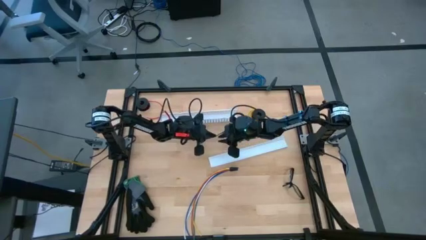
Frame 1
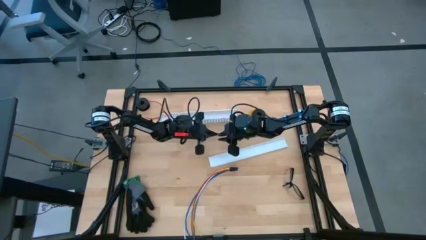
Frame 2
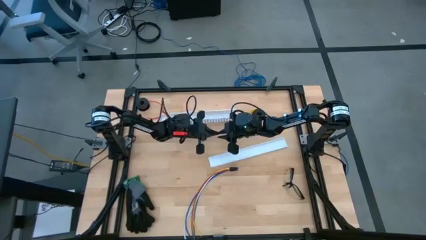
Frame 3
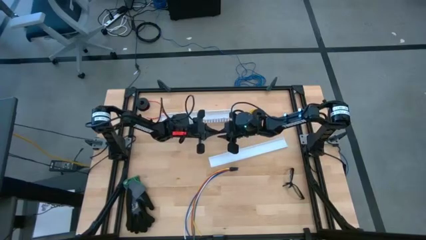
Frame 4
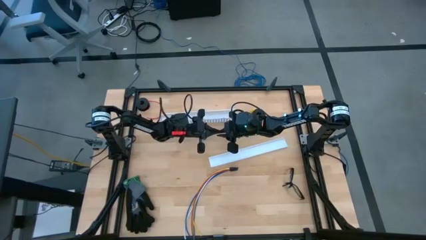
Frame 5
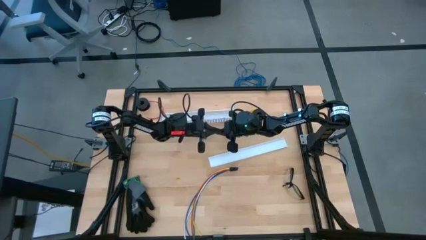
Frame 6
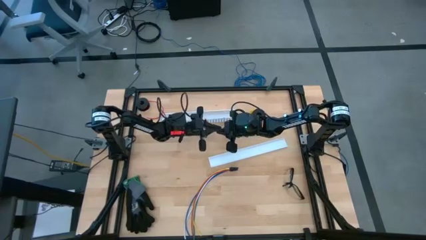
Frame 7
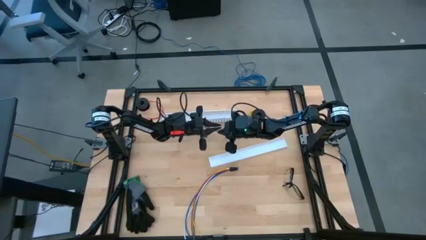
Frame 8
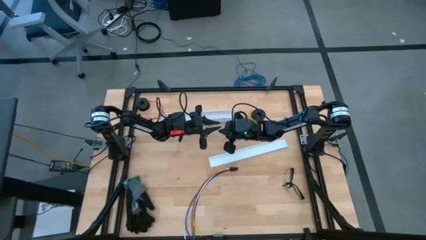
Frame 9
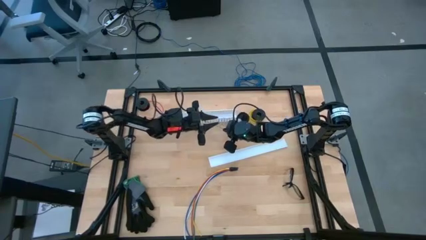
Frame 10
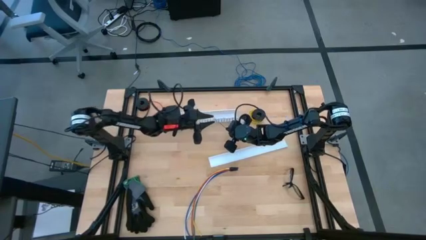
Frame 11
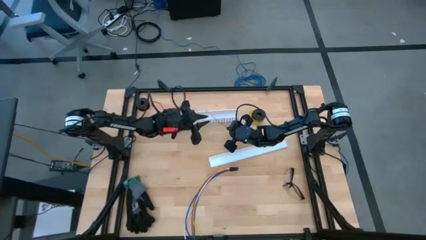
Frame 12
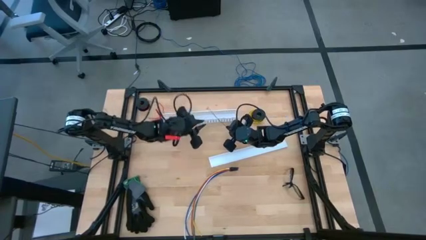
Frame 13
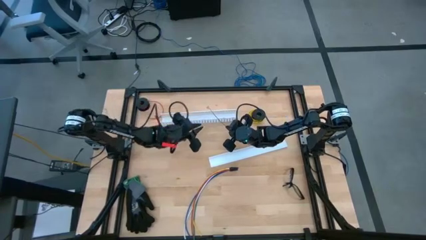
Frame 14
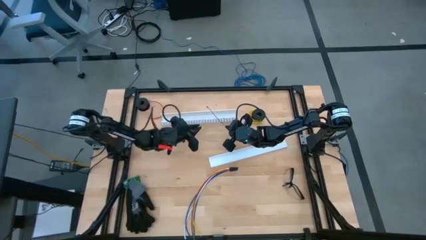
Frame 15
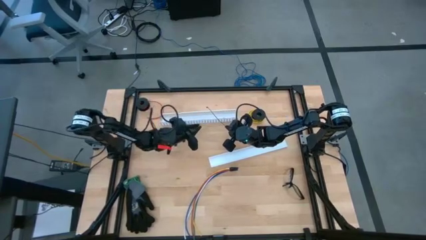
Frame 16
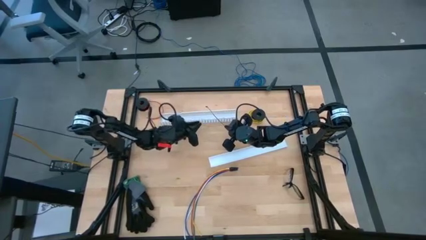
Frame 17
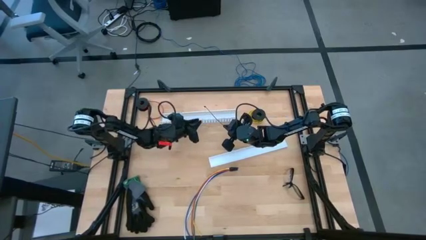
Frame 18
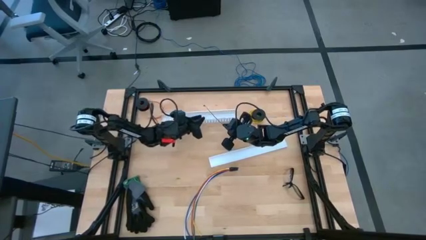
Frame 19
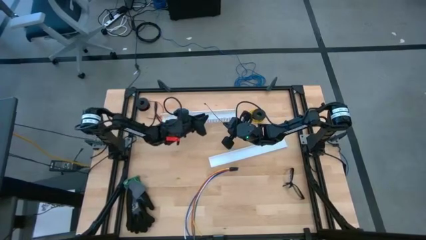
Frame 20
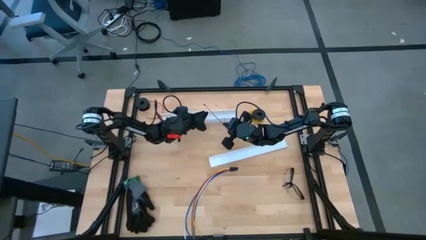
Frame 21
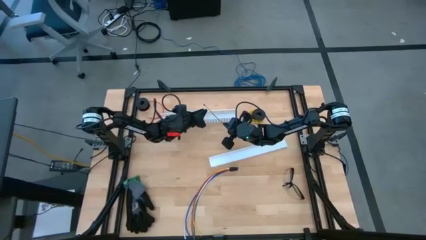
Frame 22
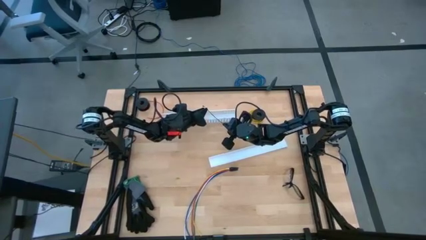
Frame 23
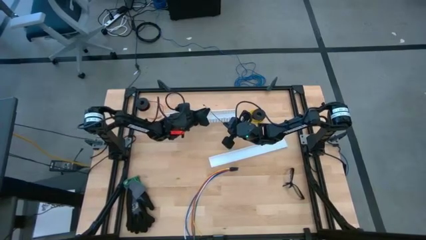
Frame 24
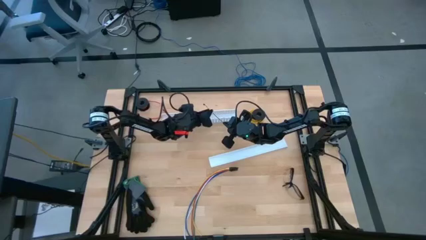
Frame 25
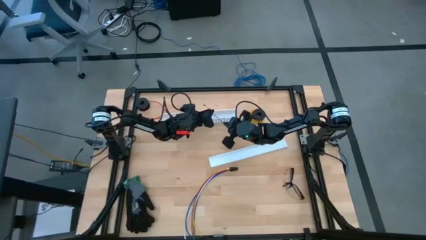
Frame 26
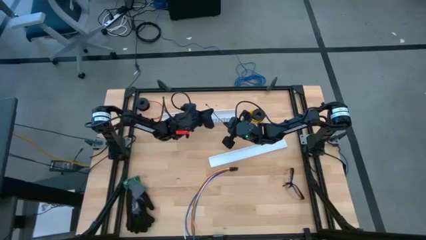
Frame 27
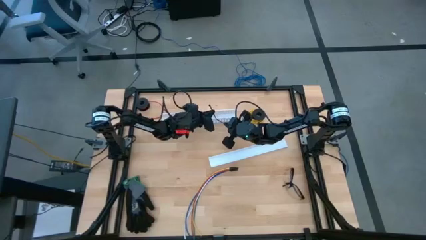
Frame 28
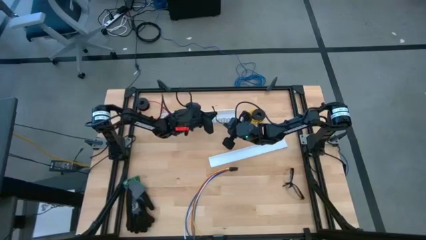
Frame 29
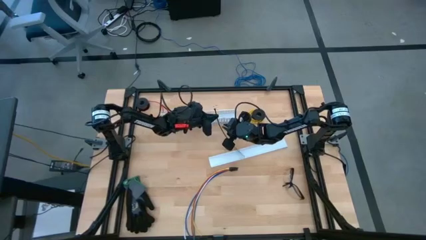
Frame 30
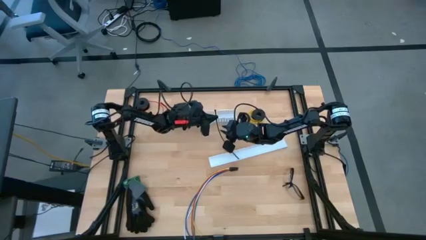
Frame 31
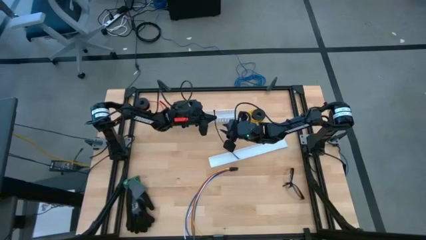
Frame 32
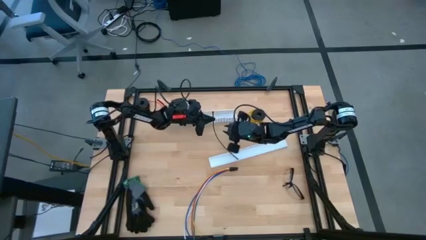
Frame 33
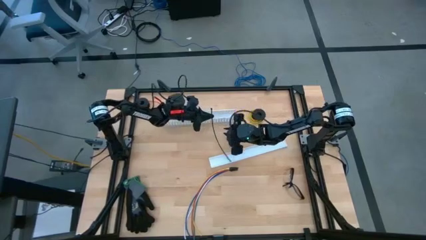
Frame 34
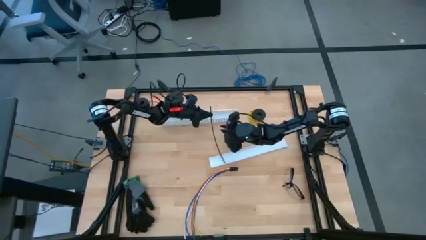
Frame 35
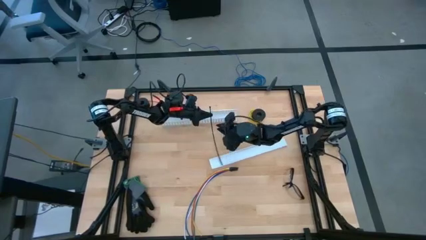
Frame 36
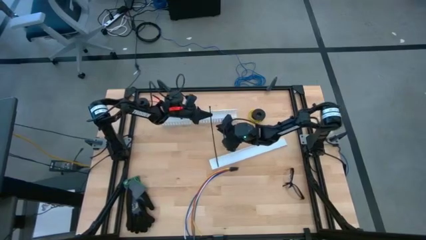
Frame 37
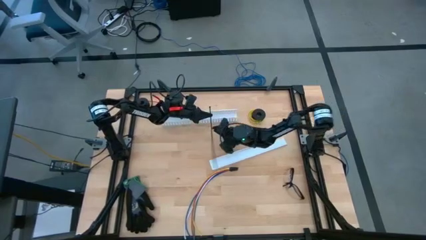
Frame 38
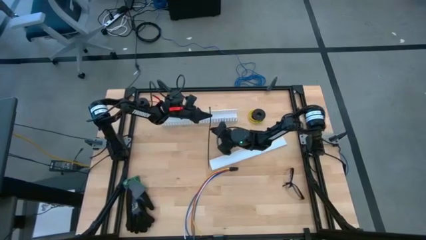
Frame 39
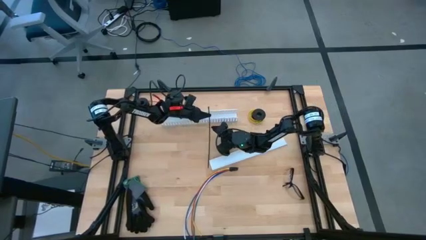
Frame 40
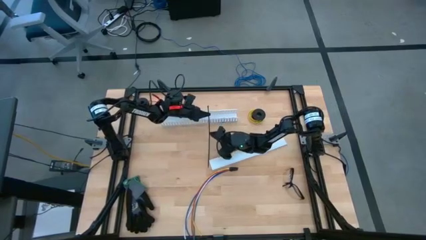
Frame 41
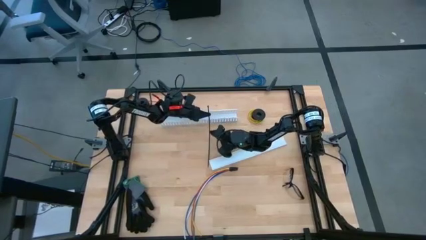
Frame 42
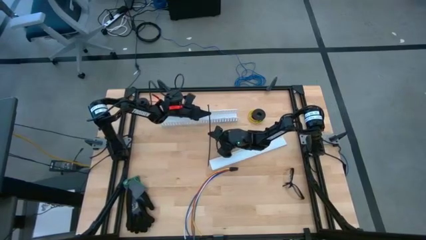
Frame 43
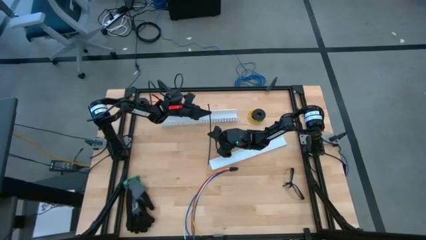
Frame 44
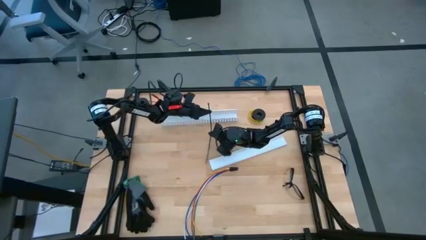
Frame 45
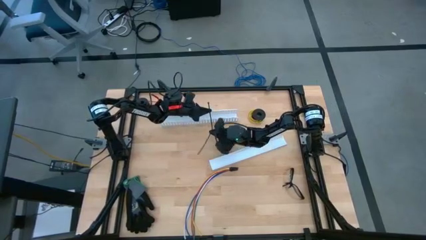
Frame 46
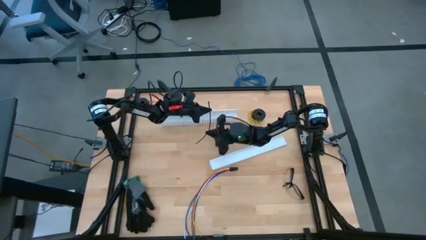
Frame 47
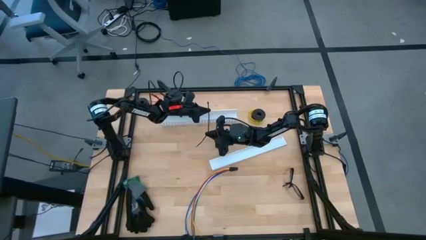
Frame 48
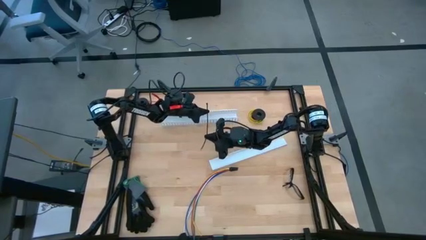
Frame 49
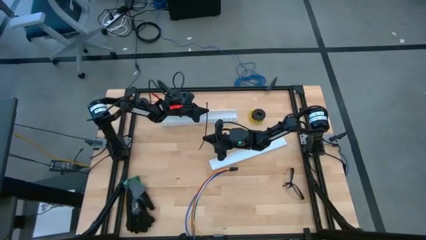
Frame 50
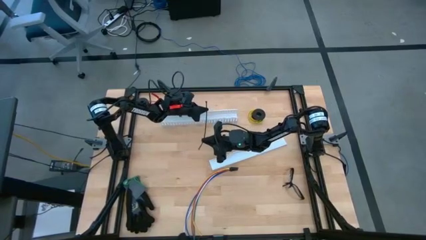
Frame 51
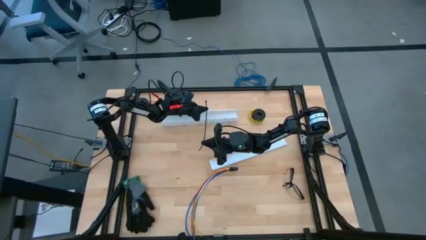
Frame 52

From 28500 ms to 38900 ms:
Task: Ziptie cables
Wrap the cables together using the black zip tie
